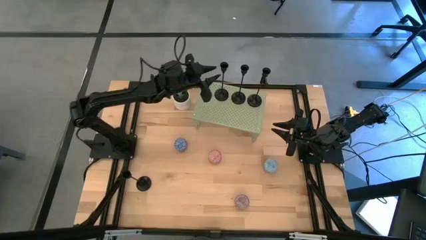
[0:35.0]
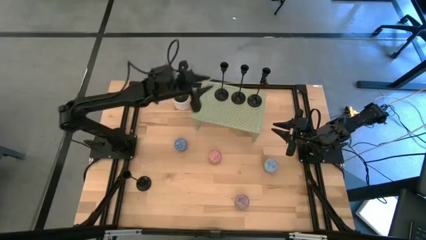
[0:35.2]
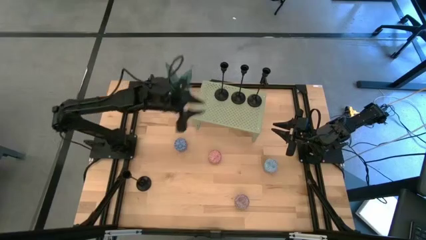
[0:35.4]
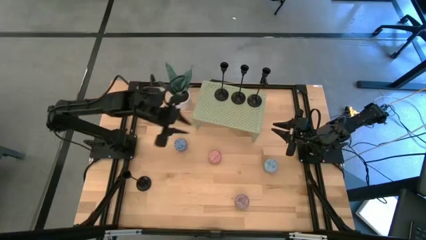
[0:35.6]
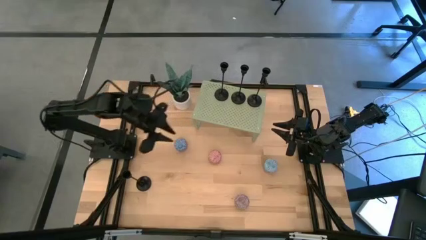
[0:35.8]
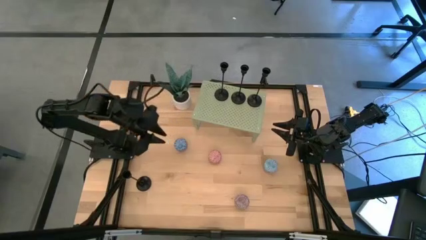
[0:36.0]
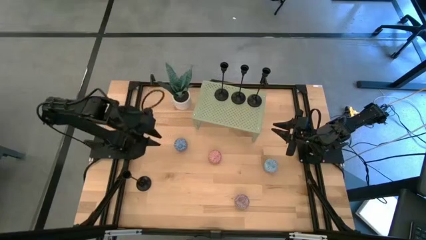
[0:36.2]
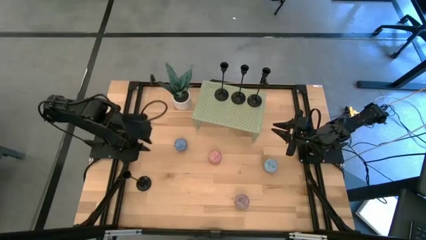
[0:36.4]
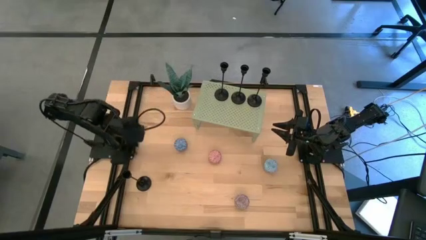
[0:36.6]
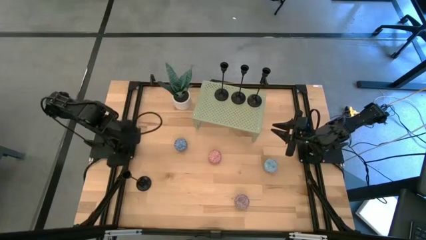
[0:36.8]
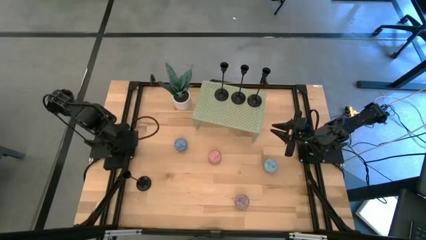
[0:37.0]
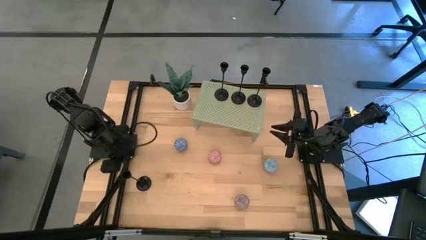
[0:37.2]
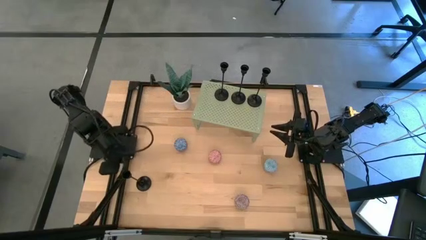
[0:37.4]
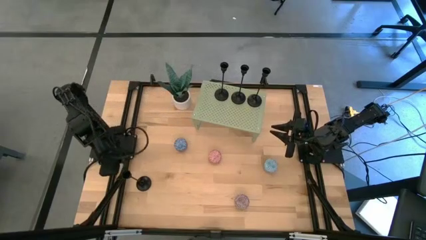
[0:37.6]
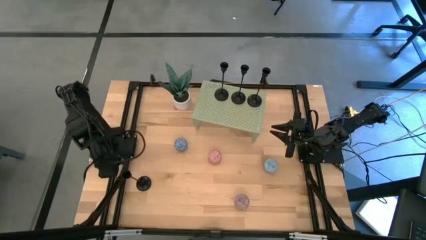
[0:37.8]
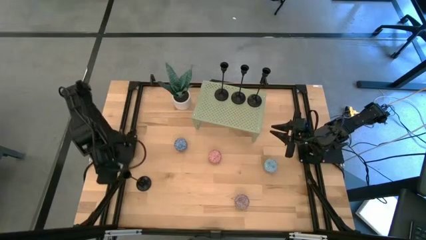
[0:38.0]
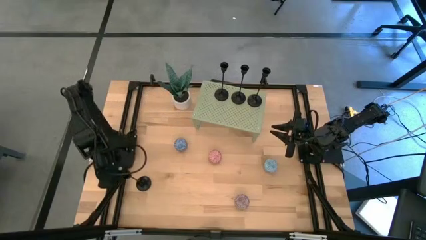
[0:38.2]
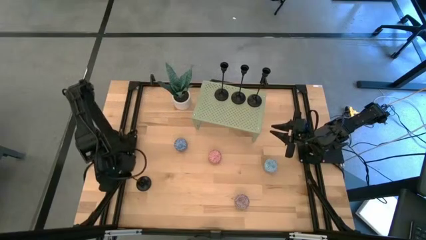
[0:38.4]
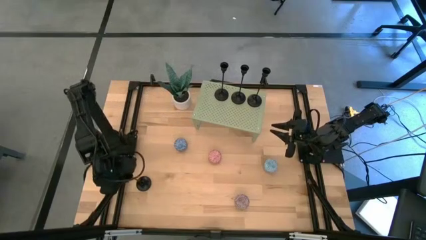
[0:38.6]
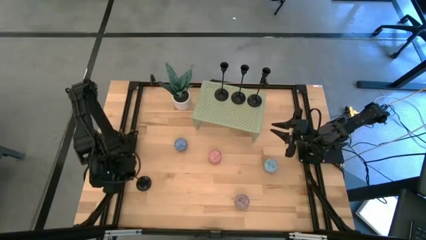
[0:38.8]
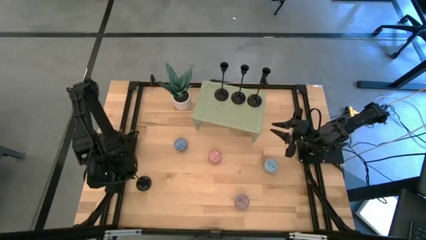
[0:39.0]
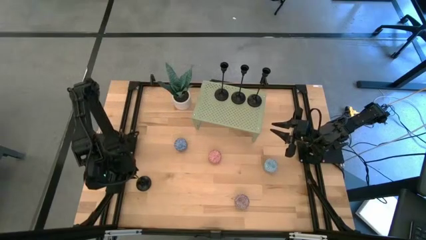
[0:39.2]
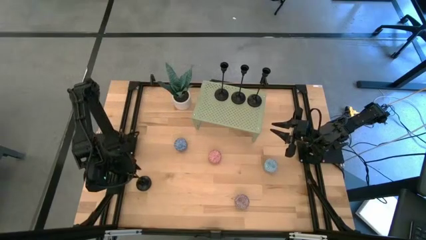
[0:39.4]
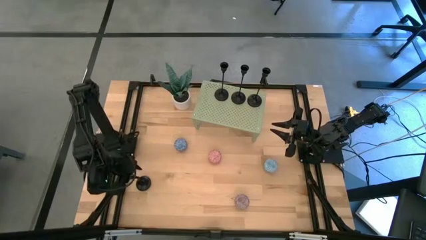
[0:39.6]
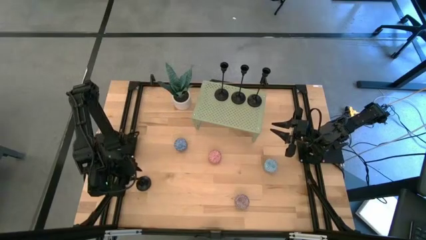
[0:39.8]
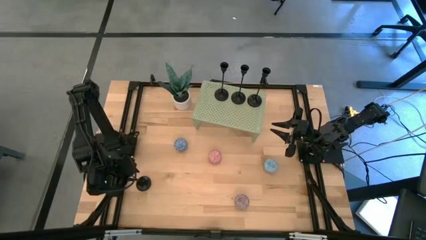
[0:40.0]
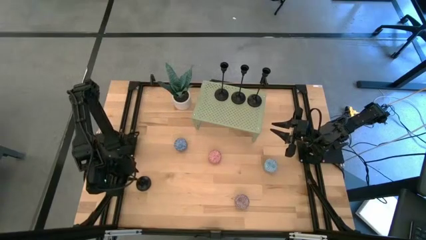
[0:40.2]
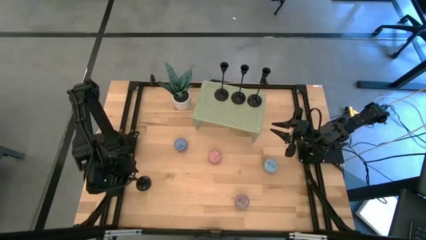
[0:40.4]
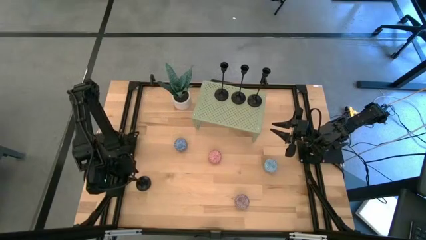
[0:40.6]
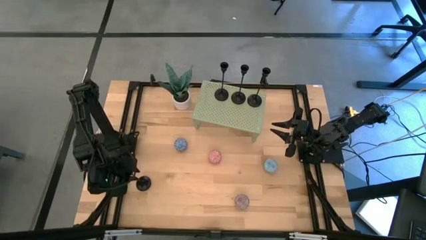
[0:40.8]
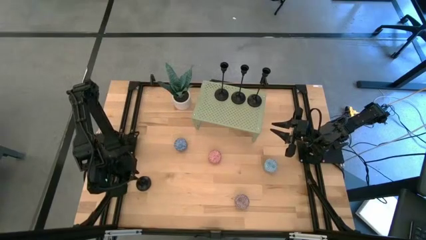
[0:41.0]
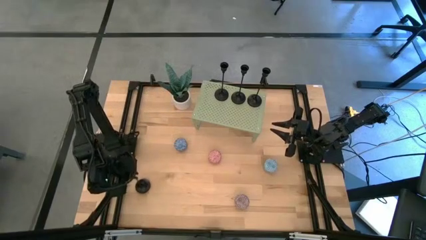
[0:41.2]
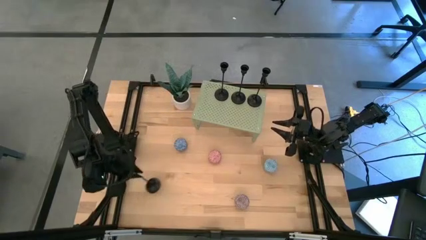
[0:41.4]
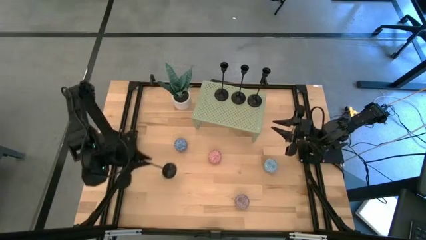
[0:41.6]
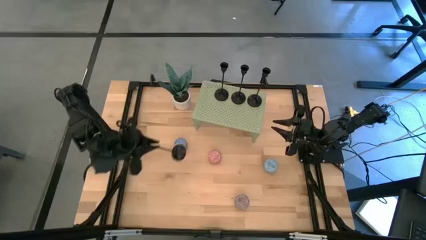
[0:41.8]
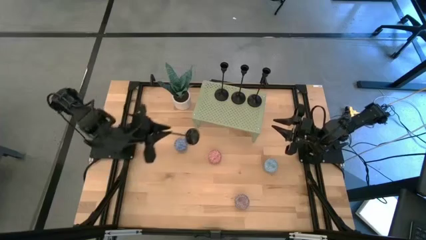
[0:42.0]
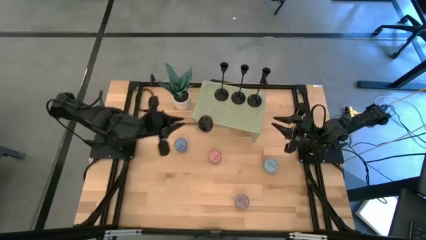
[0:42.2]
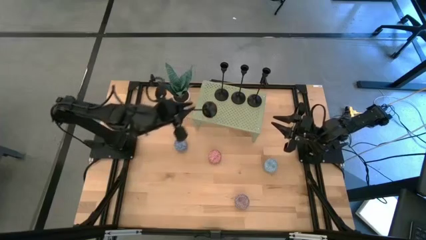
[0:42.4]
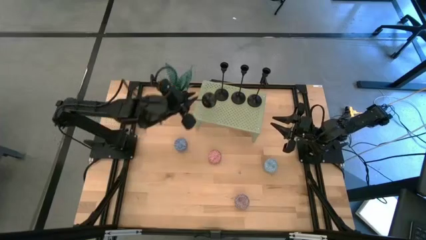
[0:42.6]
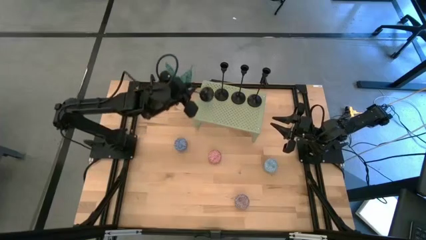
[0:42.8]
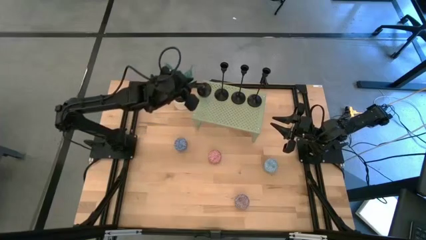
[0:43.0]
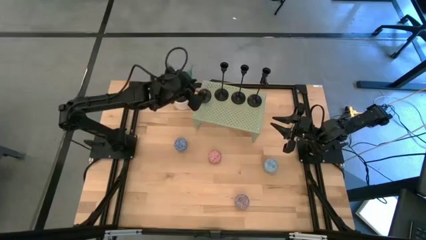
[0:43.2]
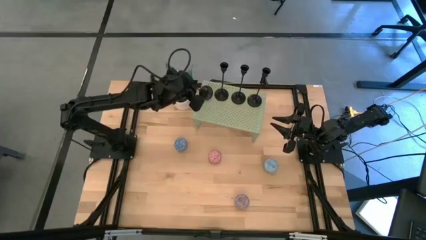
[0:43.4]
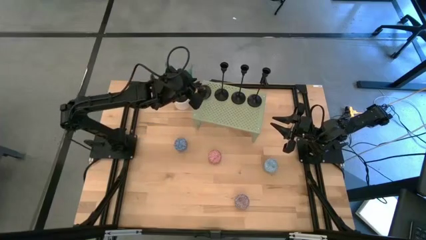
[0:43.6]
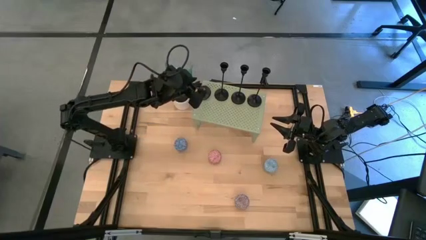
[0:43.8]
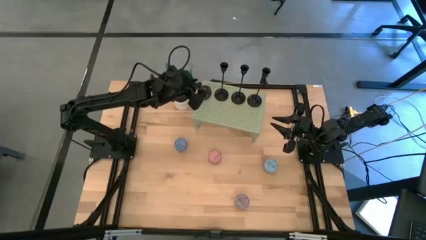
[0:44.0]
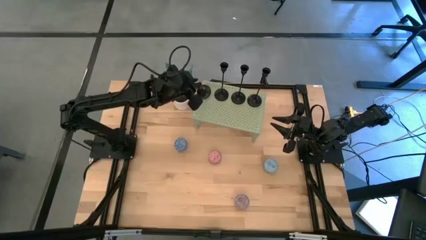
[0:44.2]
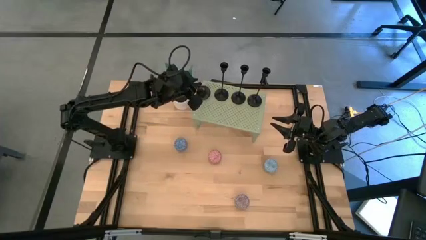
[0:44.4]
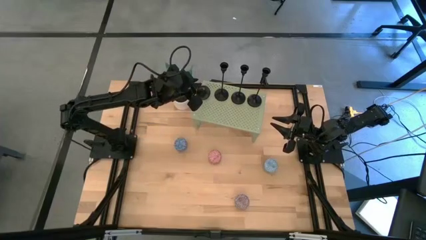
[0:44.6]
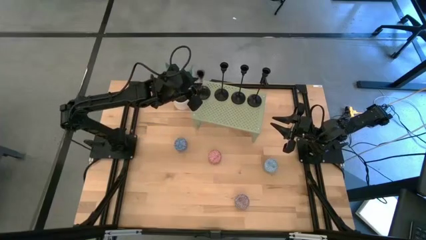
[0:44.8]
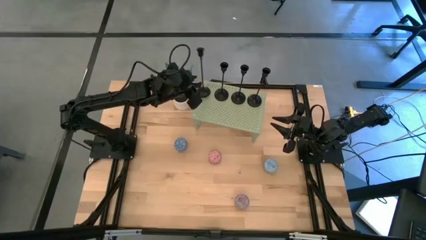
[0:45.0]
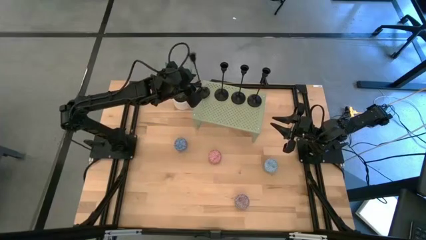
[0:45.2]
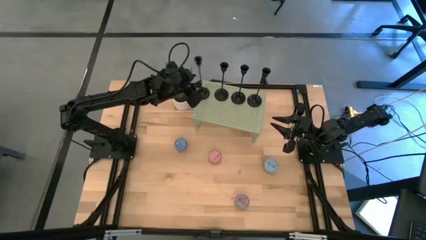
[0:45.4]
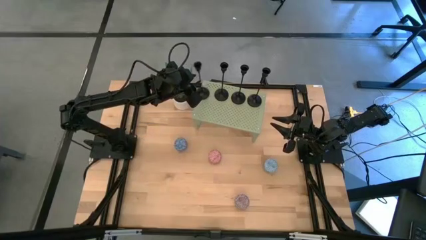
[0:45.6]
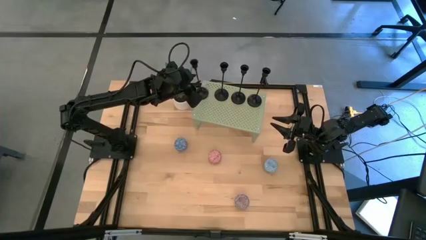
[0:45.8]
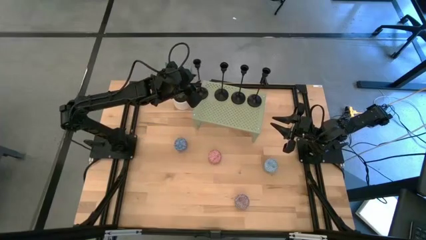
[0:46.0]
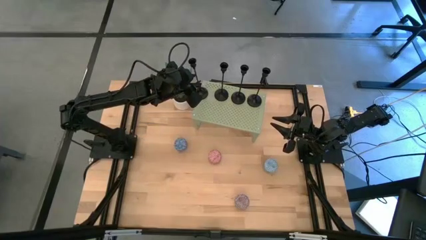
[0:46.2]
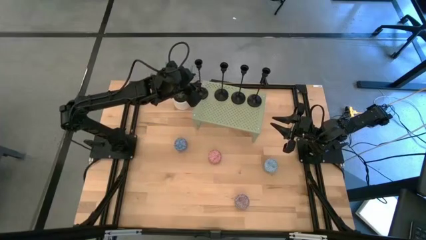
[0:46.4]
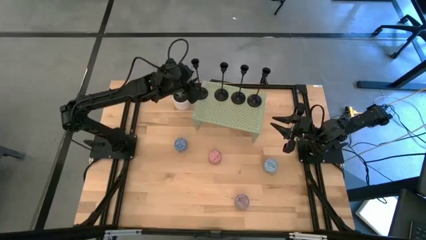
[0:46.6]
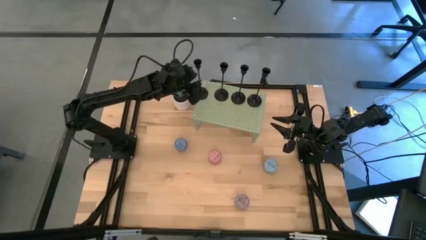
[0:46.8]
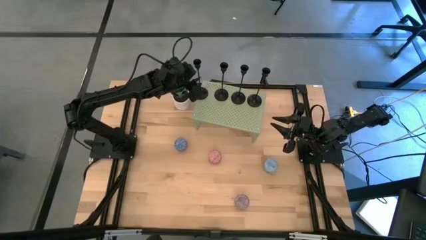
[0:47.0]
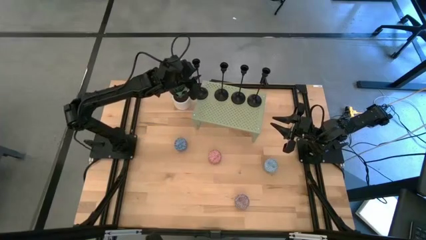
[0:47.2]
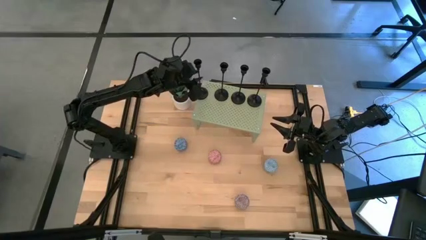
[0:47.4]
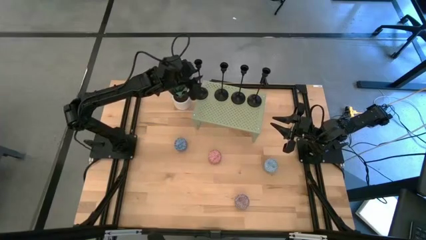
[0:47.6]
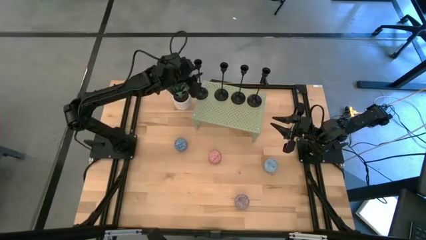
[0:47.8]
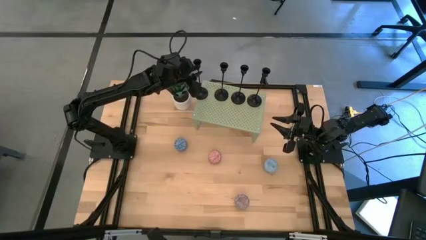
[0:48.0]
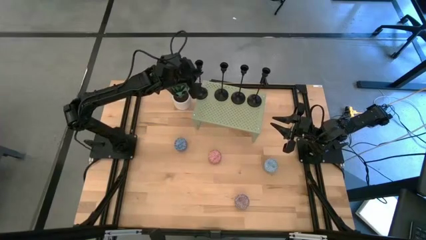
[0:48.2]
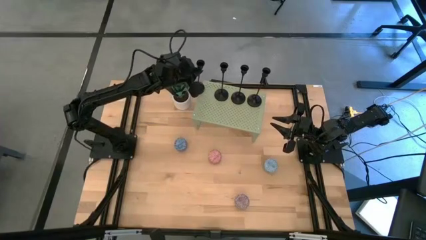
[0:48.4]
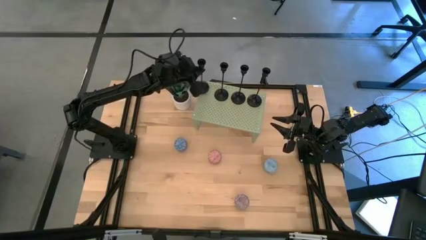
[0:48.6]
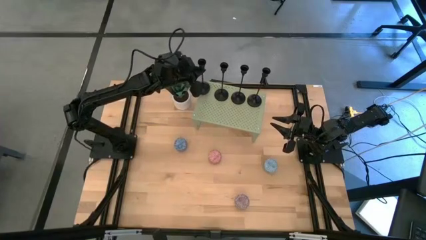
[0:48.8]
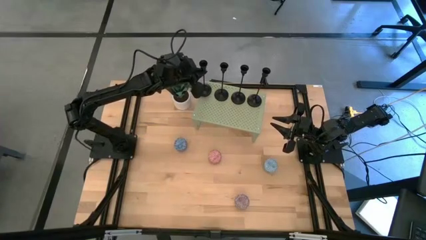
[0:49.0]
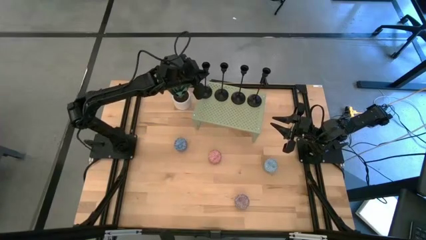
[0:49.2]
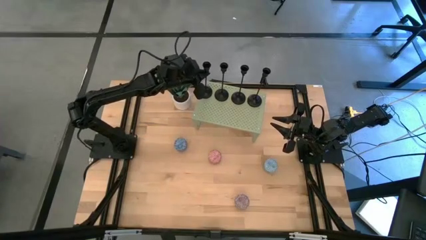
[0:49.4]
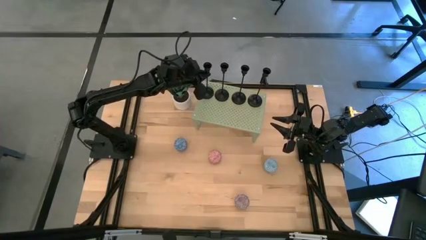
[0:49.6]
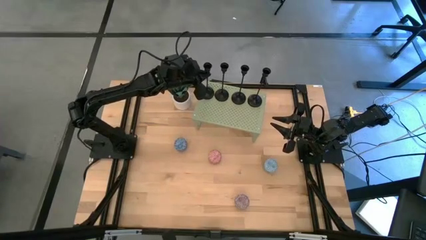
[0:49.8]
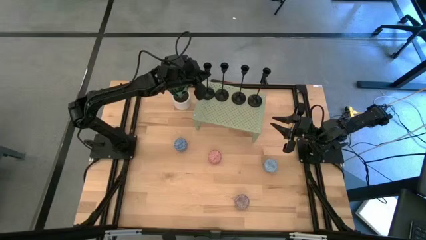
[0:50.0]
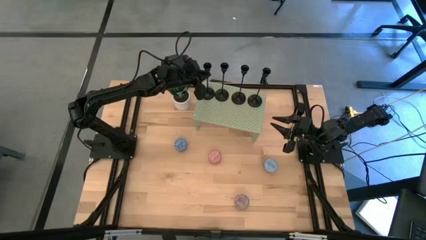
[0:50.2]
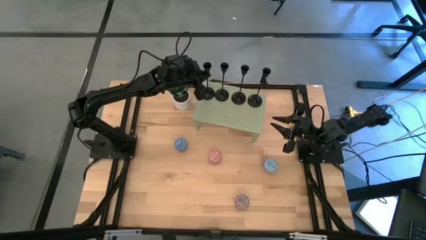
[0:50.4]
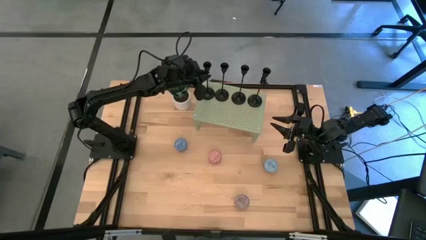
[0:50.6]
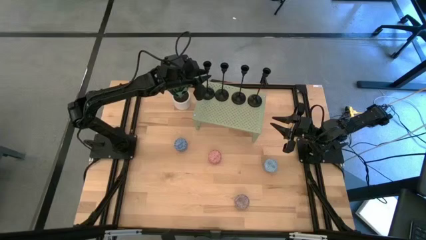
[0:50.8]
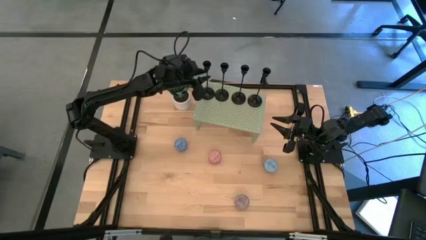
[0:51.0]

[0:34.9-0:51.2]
Task: Pick & Place candle stick holders
Put the black candle holder on the shelf aligned with the other black candle holders
